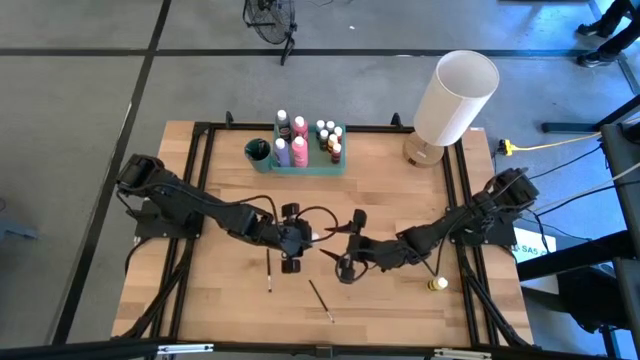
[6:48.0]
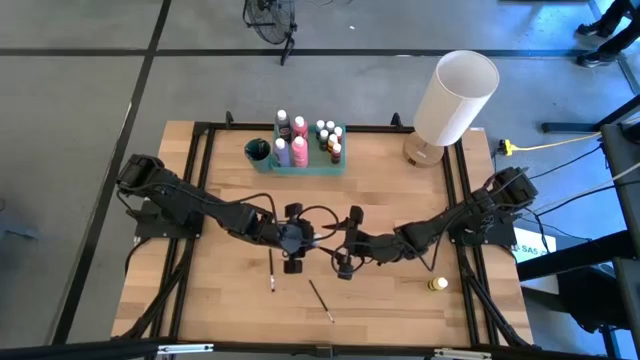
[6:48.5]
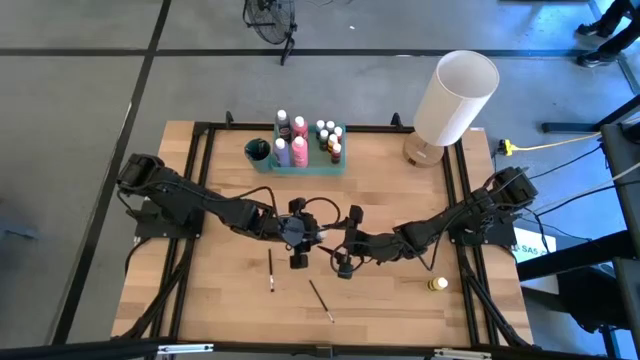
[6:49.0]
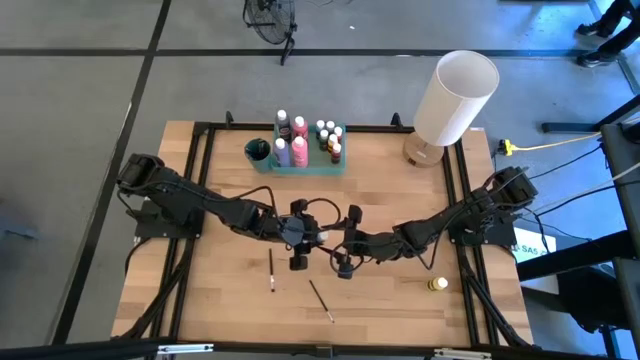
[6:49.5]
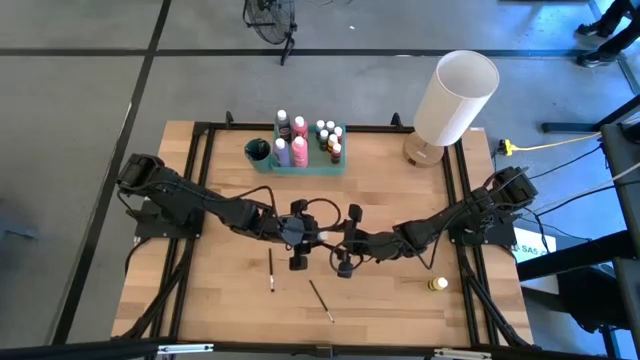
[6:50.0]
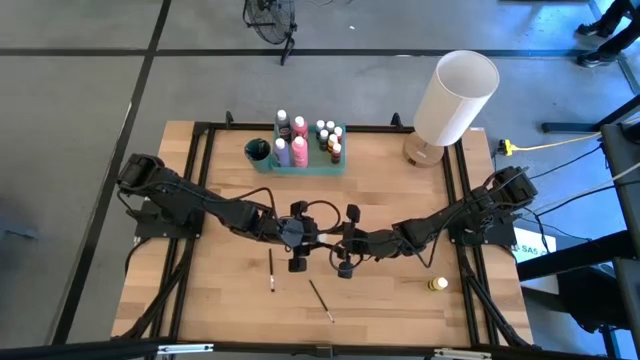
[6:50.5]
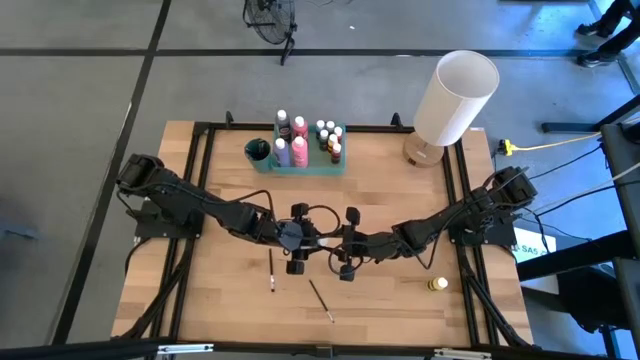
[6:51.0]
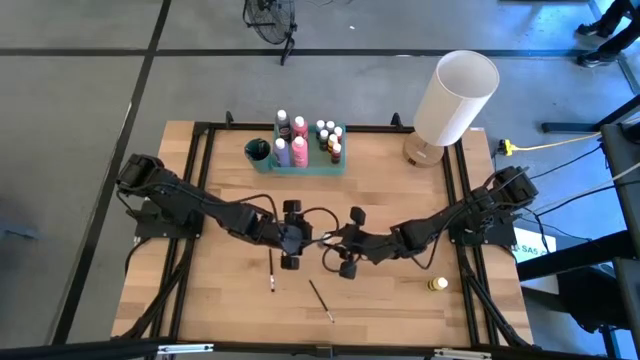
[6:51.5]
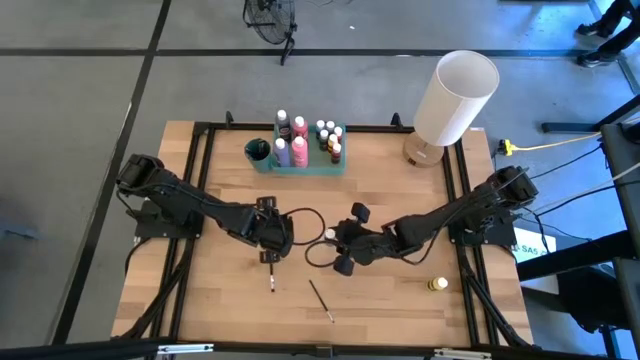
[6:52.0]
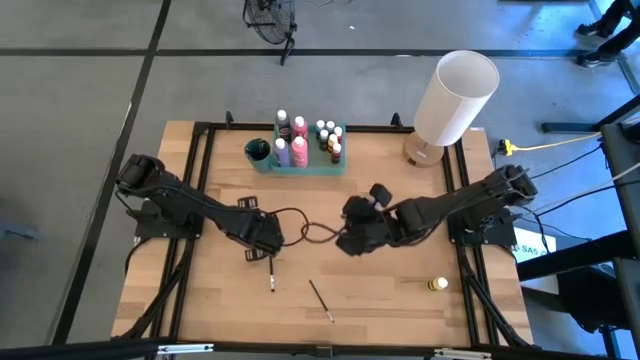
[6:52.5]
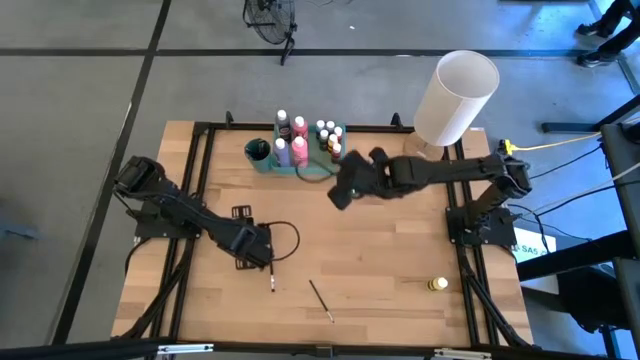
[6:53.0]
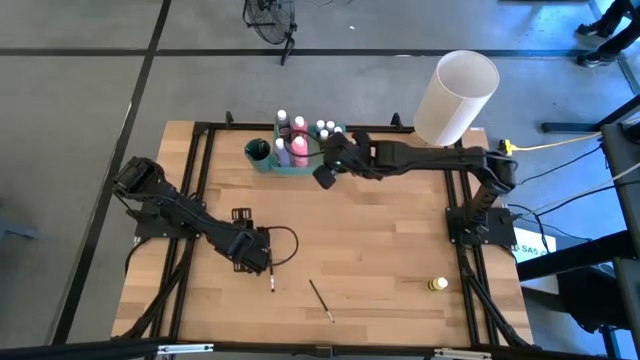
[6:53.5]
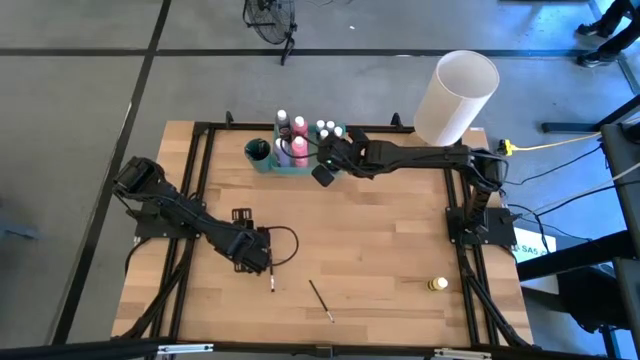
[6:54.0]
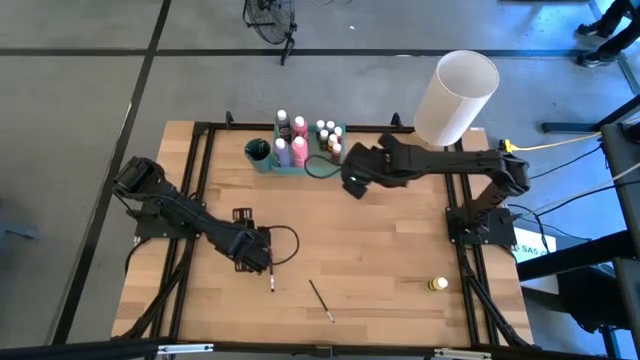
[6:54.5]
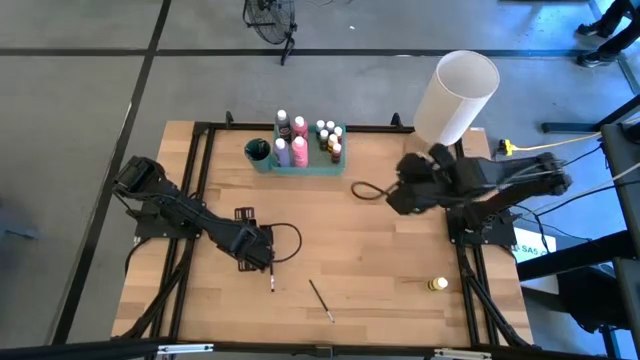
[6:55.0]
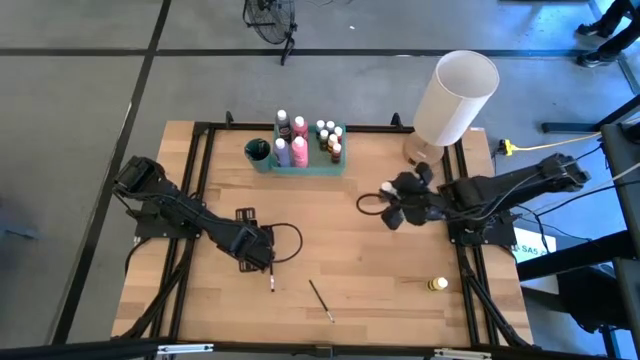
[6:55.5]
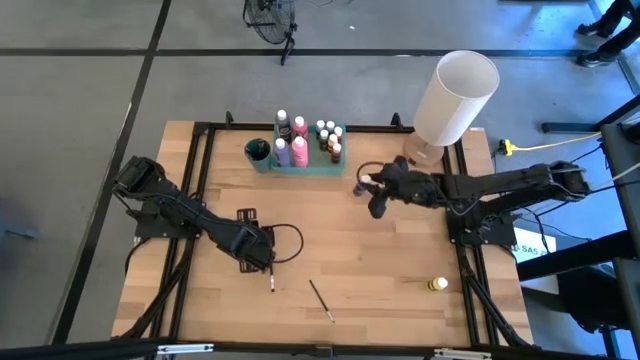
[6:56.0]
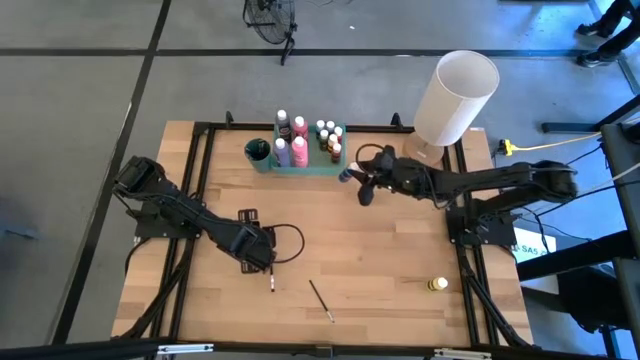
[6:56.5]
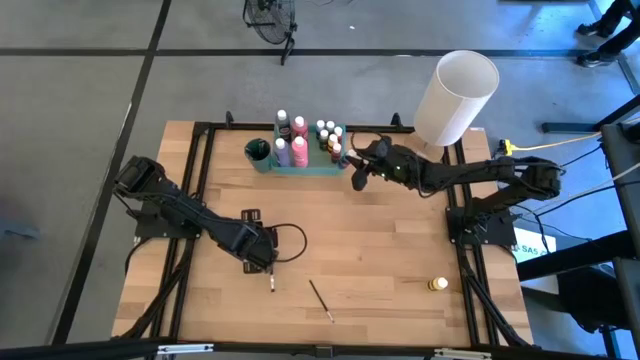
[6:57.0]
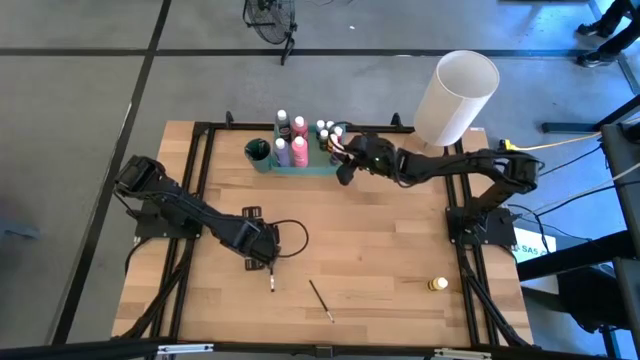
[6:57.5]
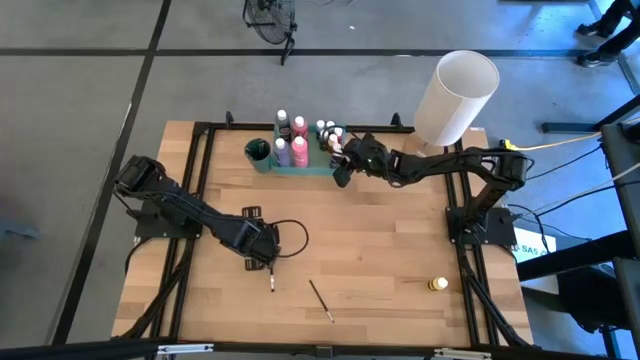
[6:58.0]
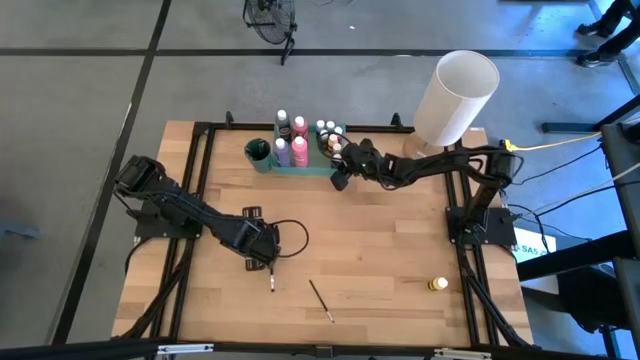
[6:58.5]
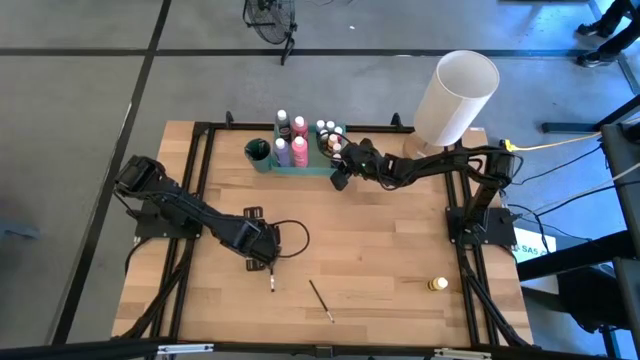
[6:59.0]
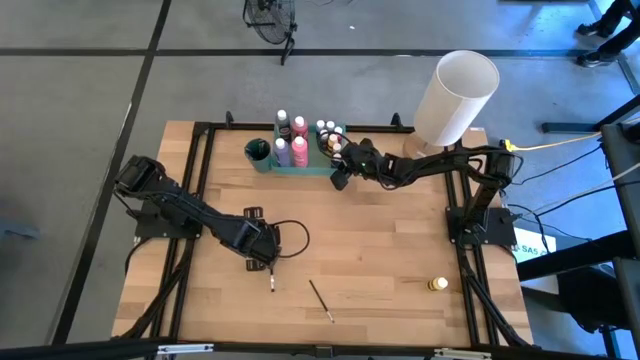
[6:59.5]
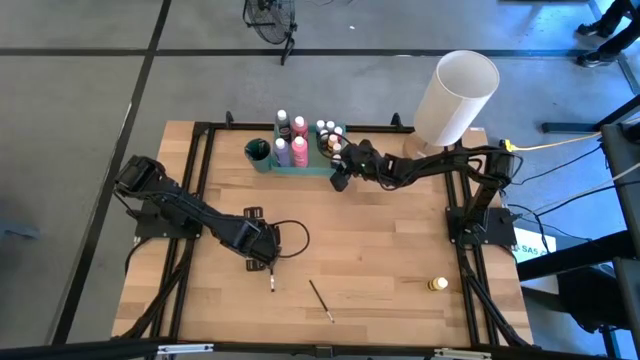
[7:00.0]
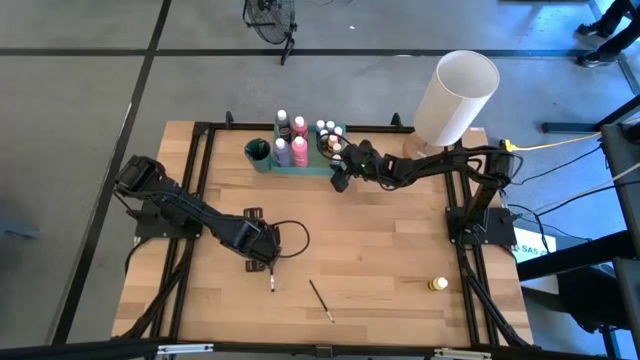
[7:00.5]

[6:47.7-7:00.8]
Task: Pick & Place Paint Supplies
Put the small blue paint bottle into the green bin

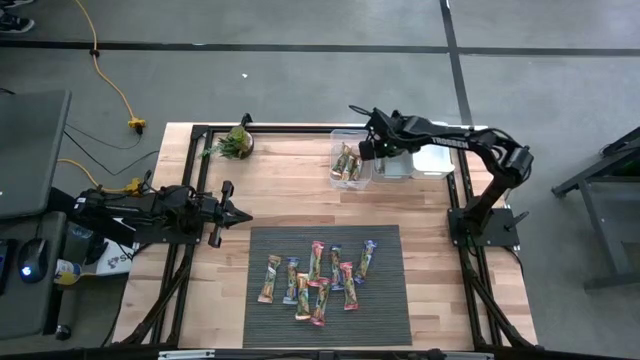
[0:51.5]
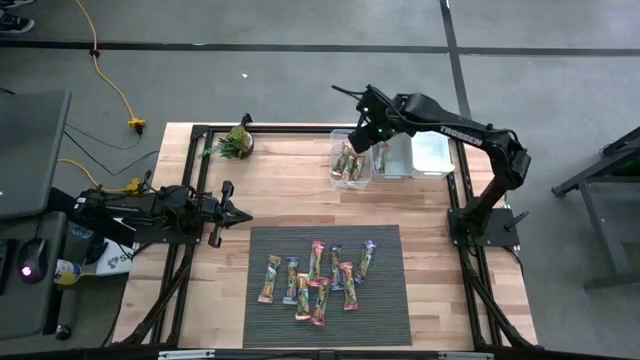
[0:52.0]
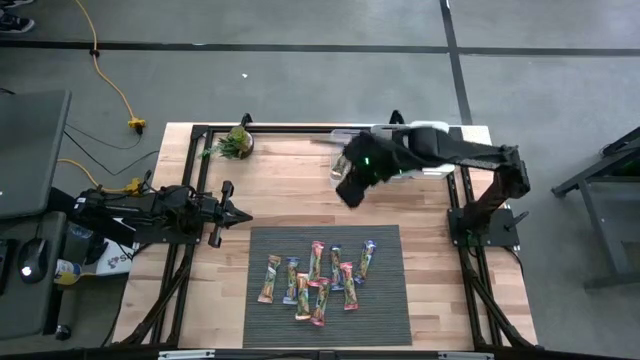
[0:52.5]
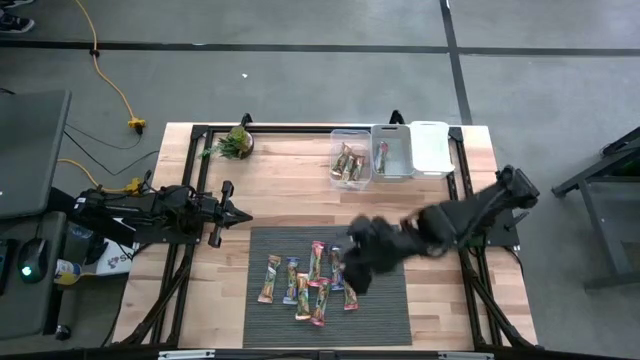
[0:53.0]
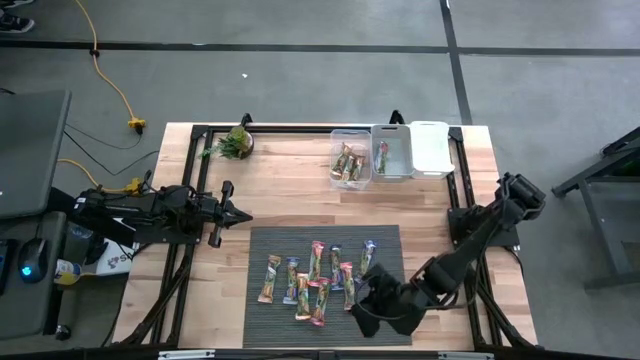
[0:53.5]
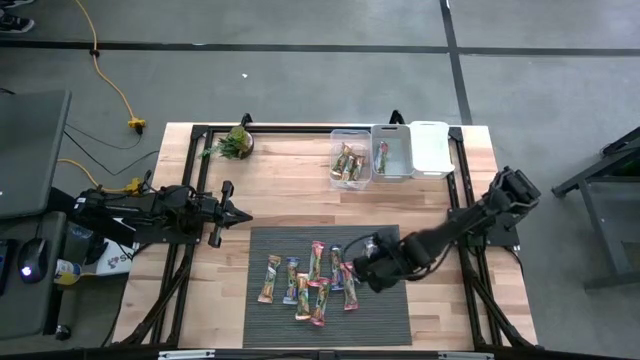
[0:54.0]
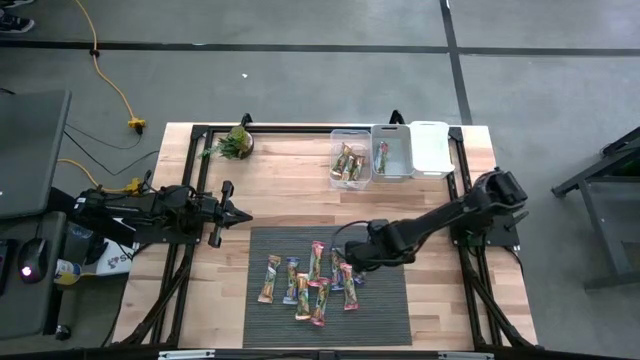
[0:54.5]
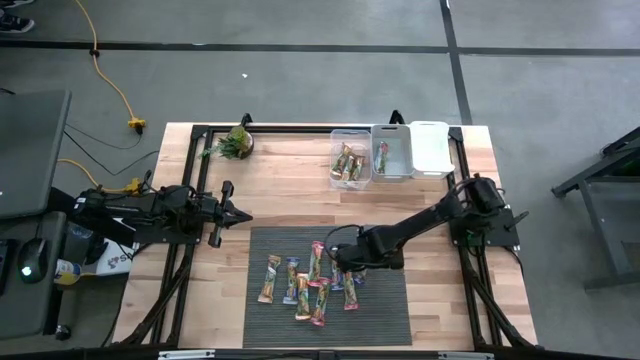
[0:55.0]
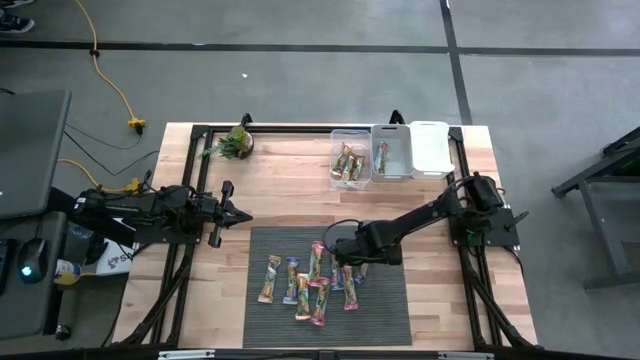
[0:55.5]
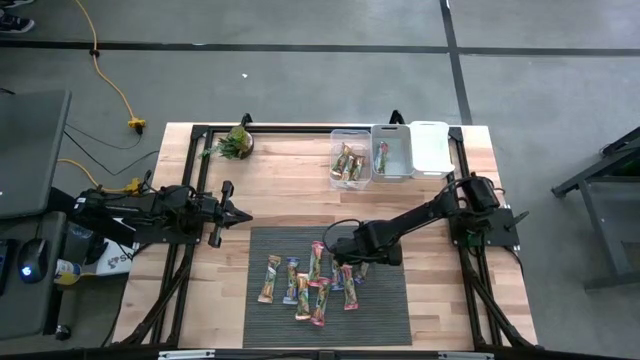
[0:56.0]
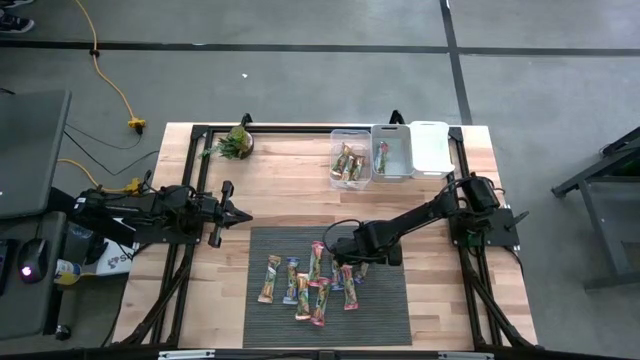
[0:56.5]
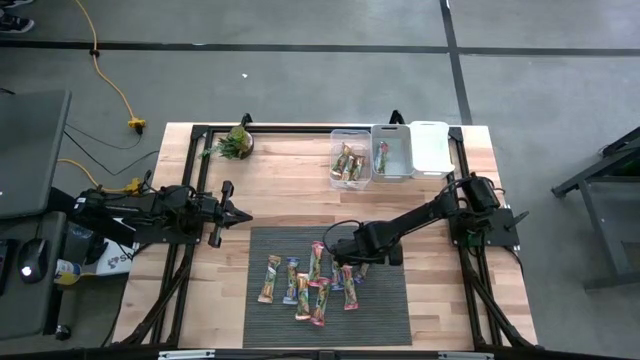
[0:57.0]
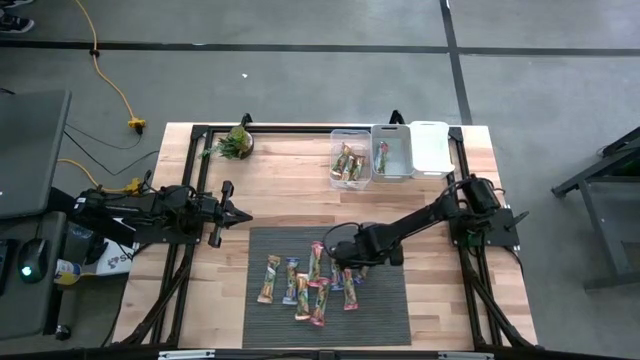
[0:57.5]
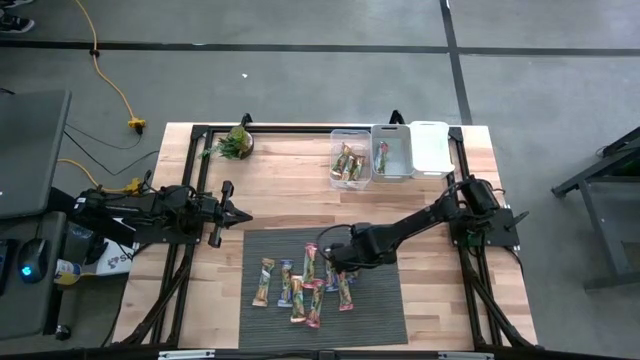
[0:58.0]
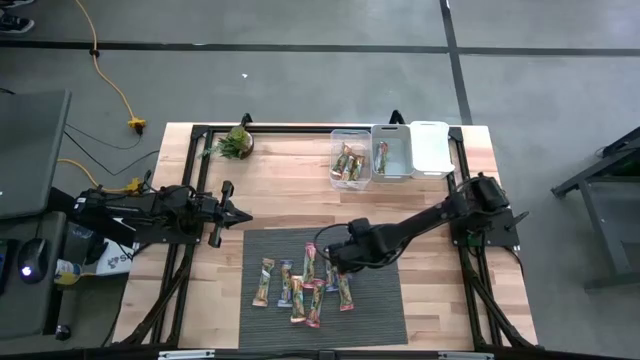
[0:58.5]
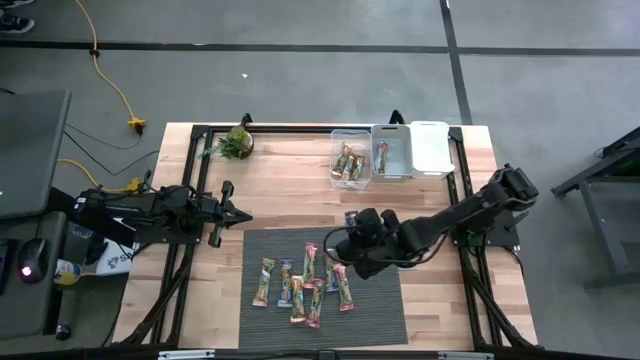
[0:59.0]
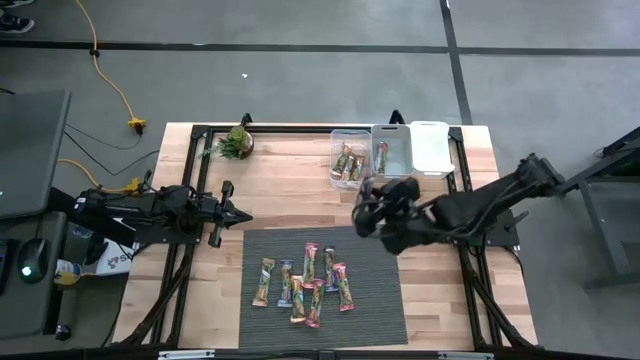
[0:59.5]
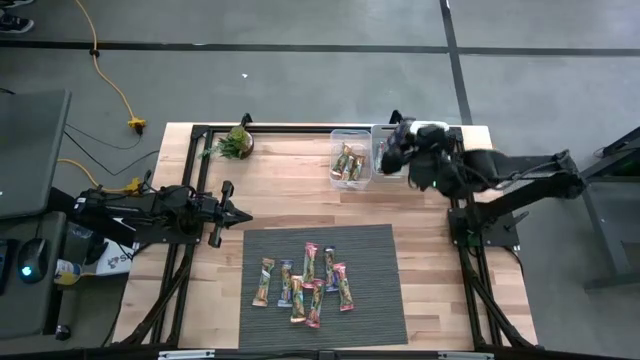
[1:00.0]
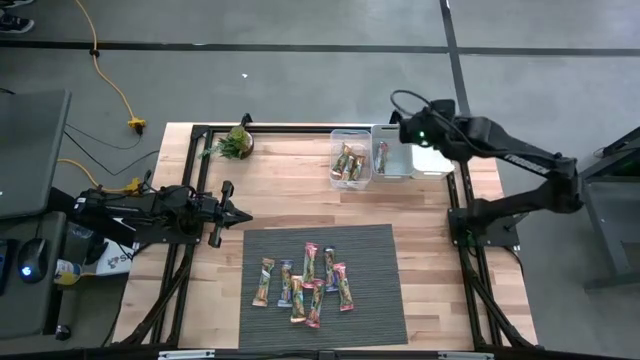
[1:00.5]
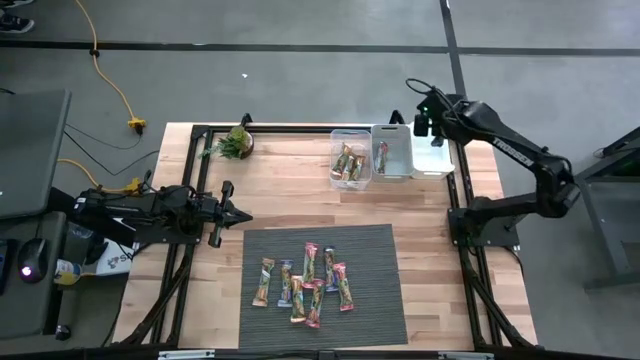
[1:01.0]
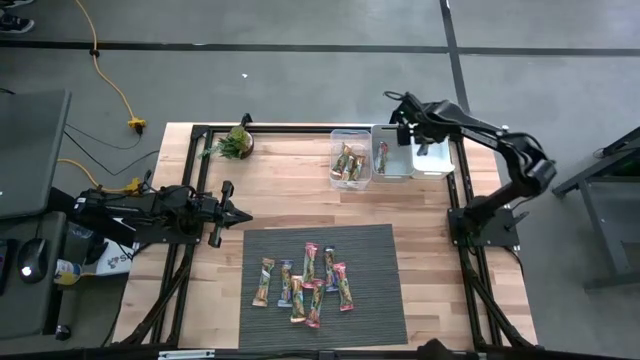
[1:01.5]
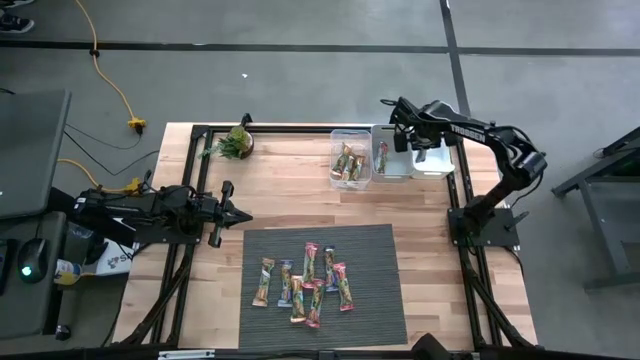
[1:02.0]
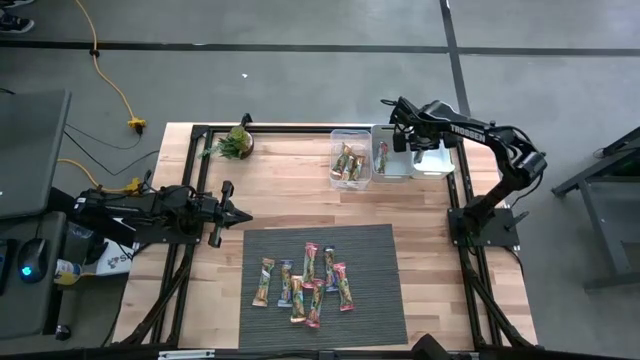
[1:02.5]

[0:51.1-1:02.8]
Task: Pick and place Granola Bars by type
Put the blue granola bar into the white bin
